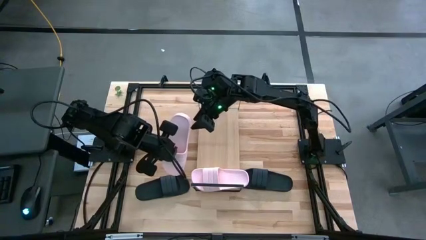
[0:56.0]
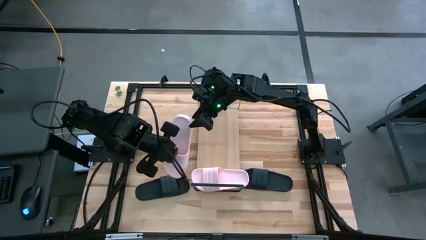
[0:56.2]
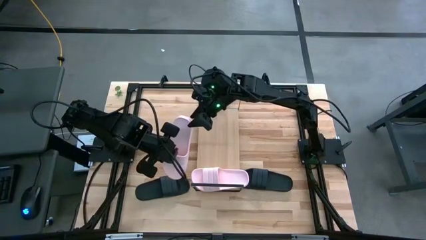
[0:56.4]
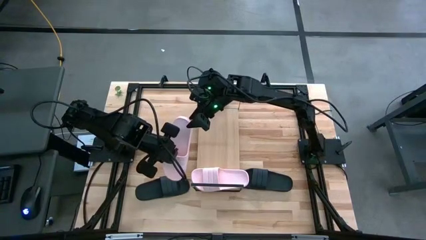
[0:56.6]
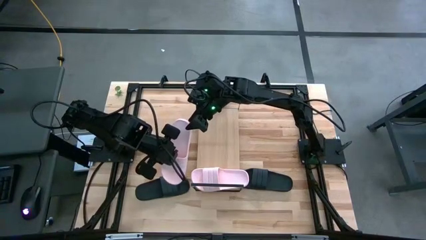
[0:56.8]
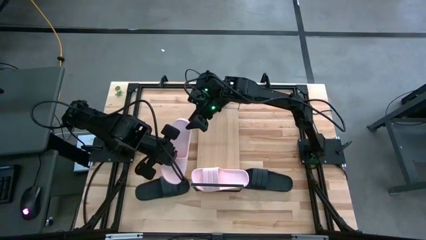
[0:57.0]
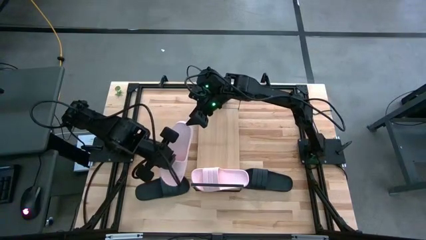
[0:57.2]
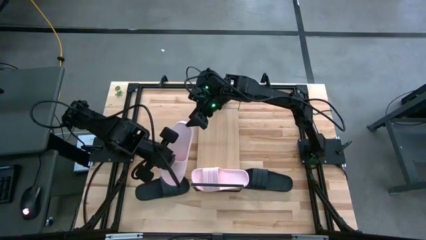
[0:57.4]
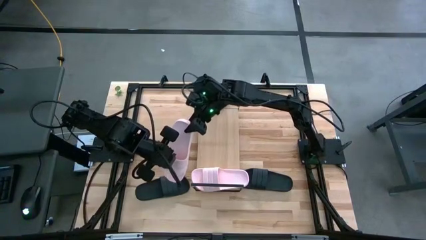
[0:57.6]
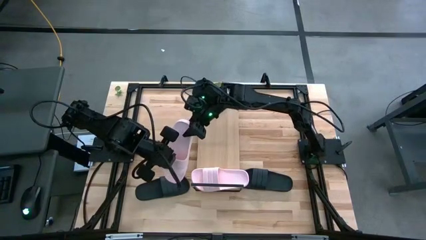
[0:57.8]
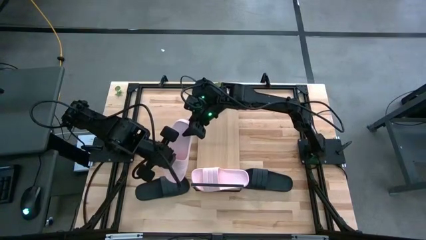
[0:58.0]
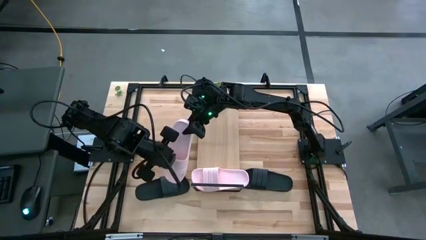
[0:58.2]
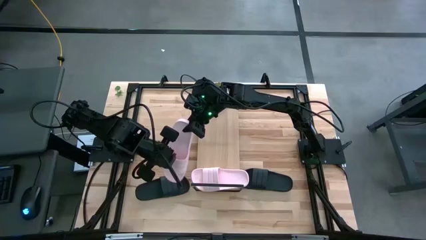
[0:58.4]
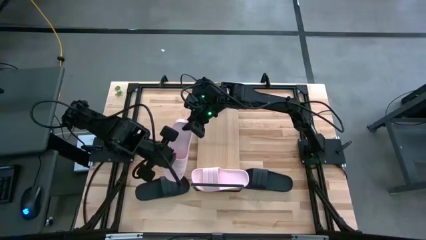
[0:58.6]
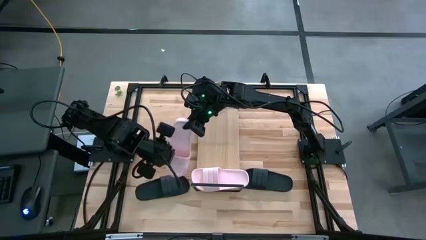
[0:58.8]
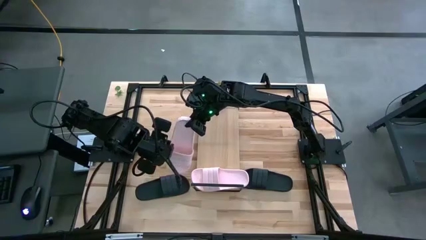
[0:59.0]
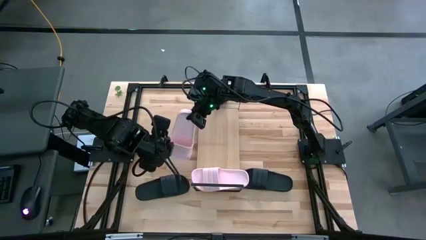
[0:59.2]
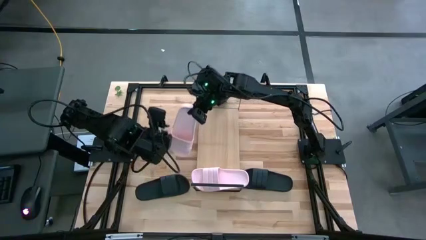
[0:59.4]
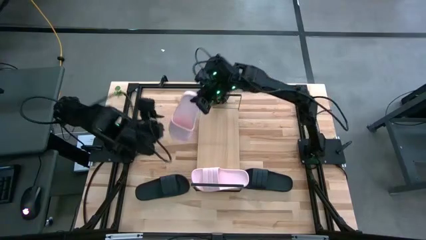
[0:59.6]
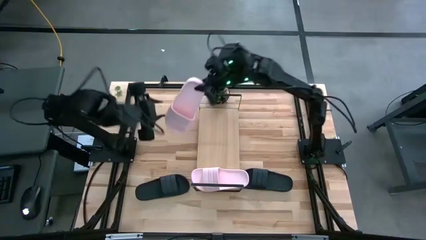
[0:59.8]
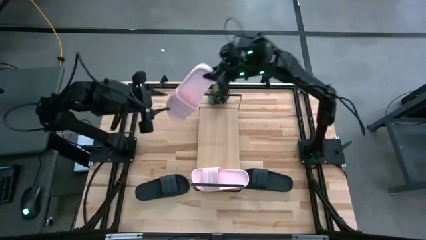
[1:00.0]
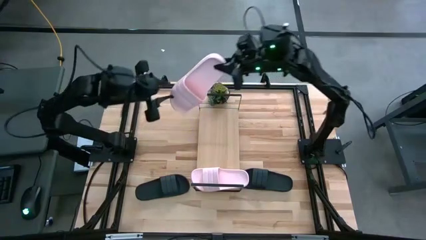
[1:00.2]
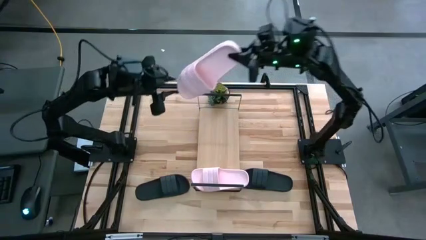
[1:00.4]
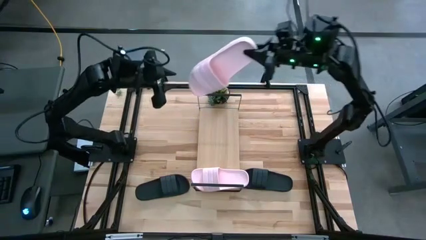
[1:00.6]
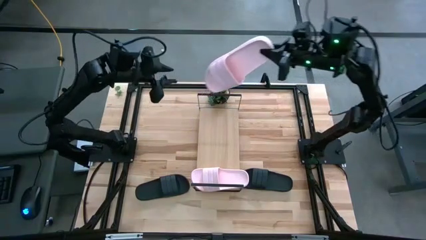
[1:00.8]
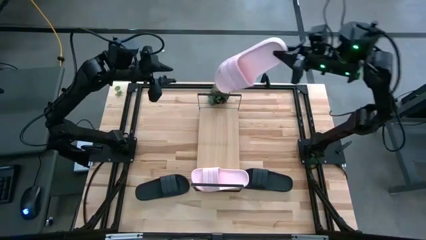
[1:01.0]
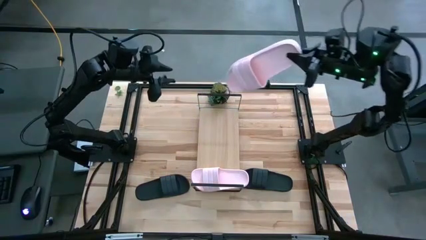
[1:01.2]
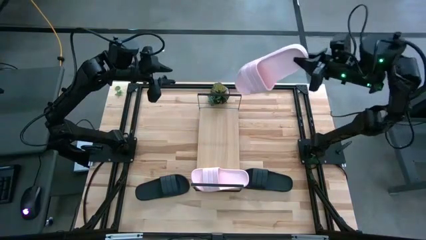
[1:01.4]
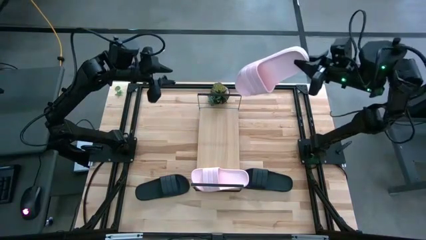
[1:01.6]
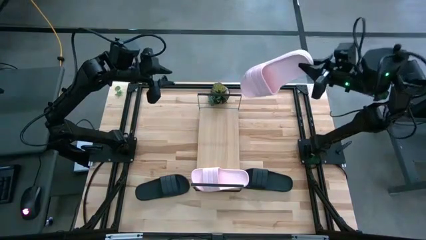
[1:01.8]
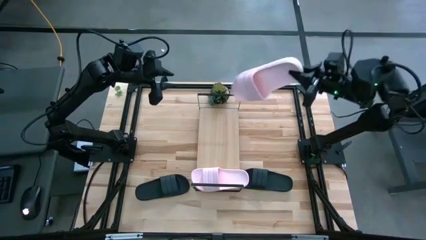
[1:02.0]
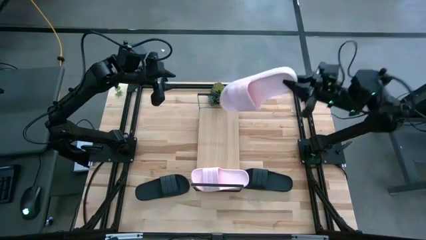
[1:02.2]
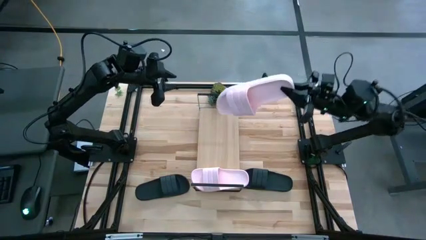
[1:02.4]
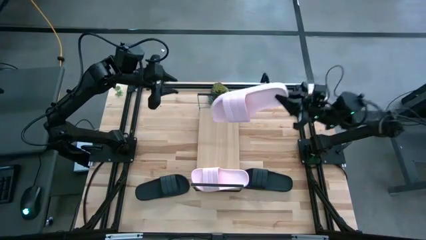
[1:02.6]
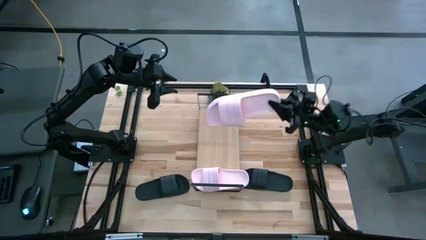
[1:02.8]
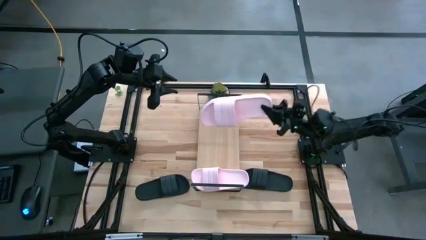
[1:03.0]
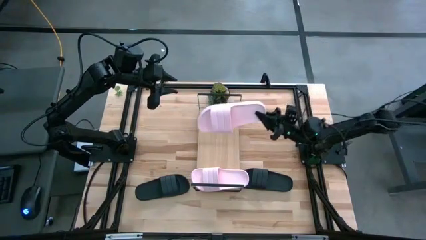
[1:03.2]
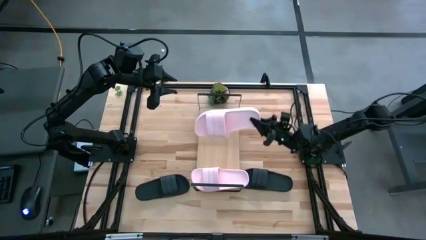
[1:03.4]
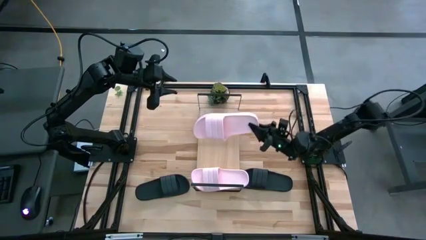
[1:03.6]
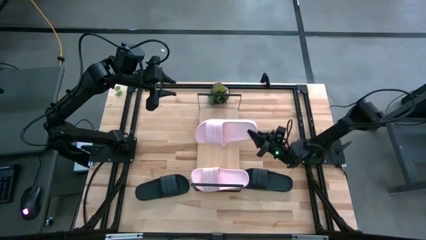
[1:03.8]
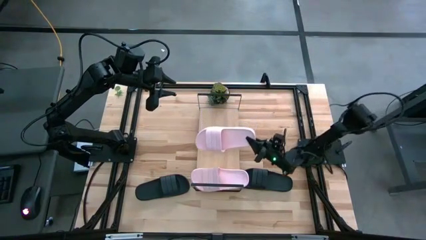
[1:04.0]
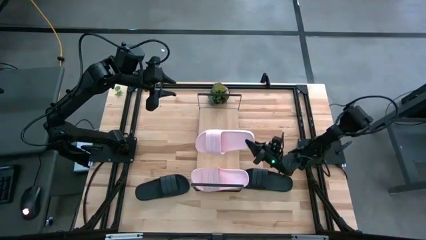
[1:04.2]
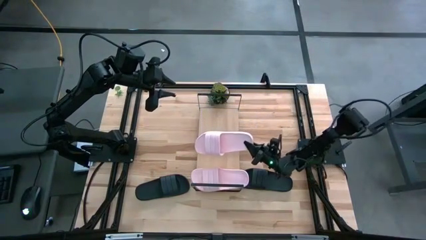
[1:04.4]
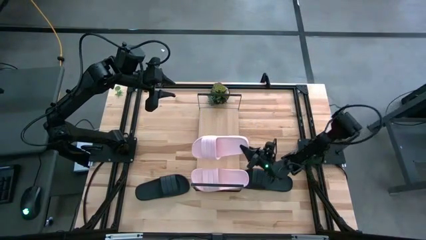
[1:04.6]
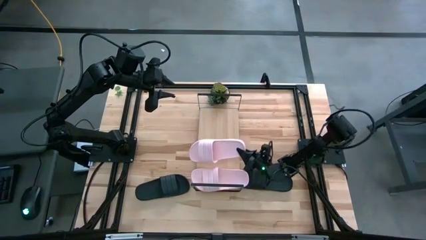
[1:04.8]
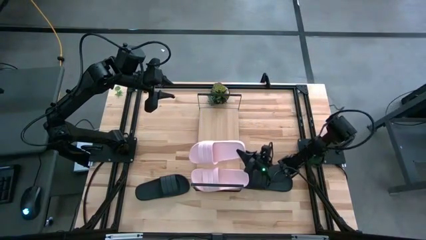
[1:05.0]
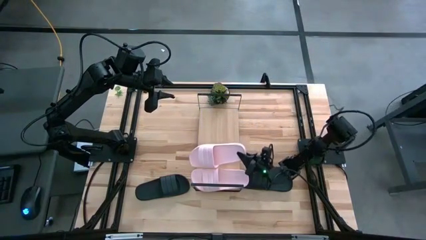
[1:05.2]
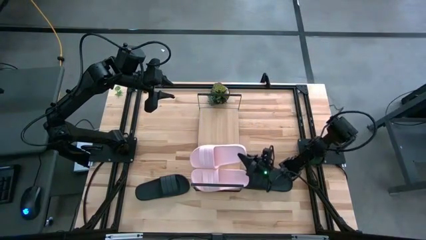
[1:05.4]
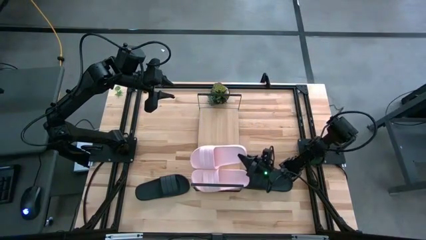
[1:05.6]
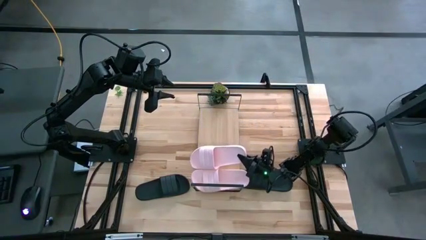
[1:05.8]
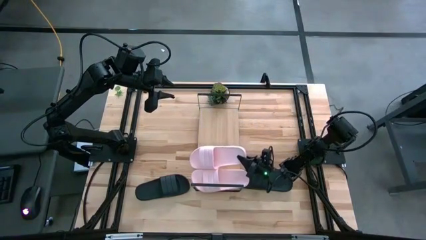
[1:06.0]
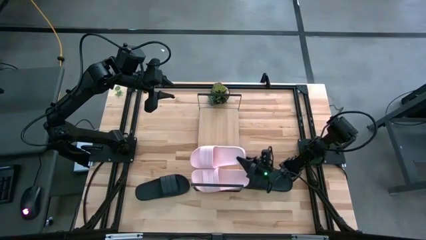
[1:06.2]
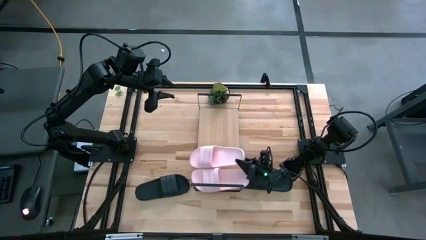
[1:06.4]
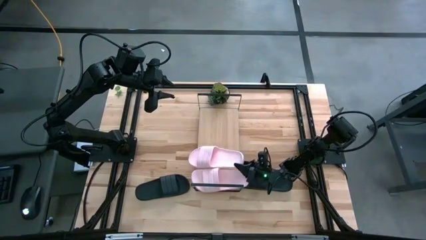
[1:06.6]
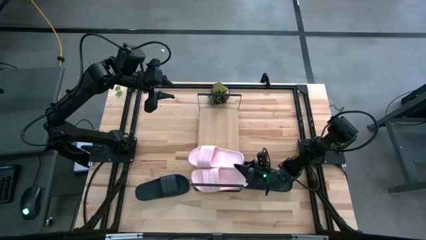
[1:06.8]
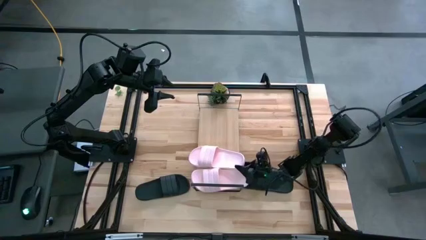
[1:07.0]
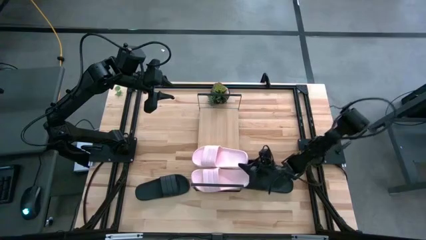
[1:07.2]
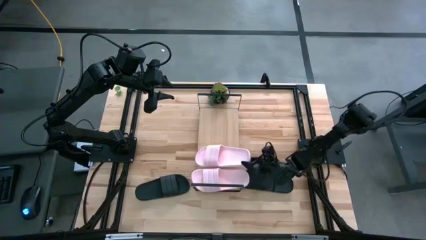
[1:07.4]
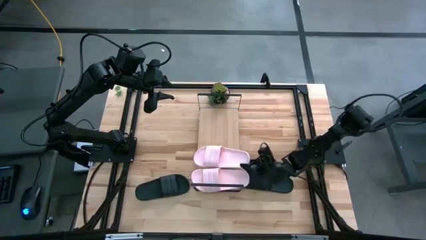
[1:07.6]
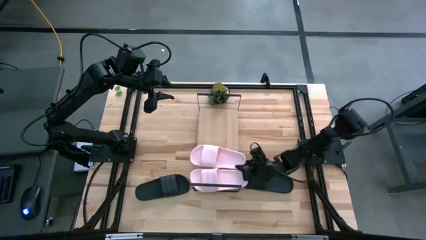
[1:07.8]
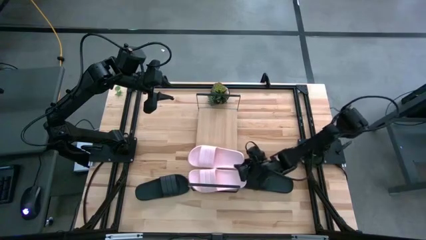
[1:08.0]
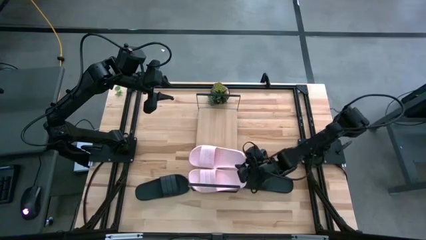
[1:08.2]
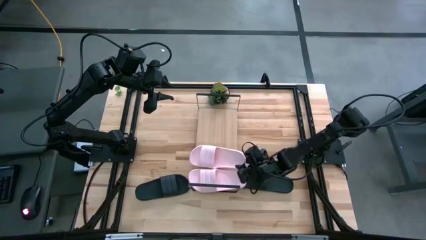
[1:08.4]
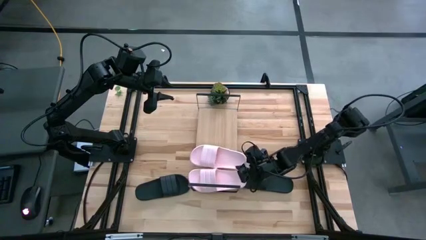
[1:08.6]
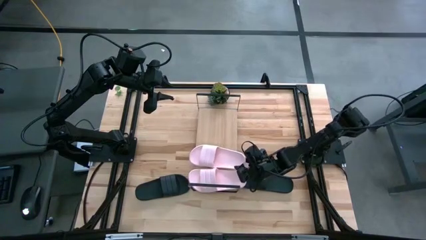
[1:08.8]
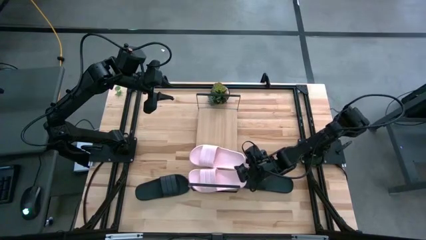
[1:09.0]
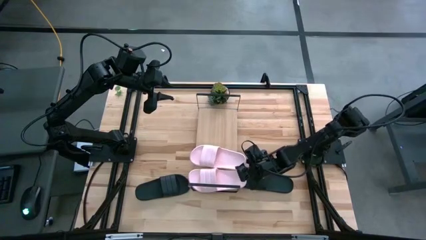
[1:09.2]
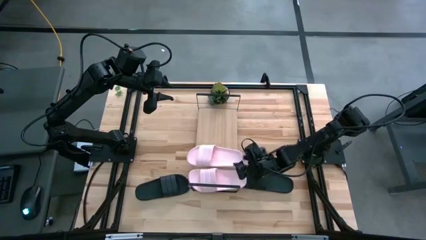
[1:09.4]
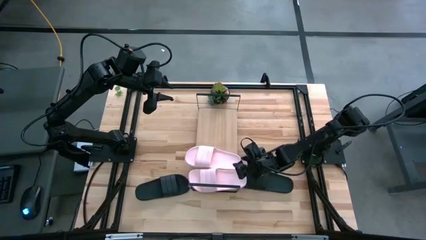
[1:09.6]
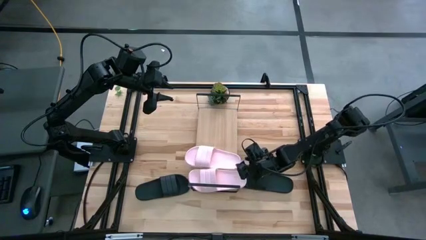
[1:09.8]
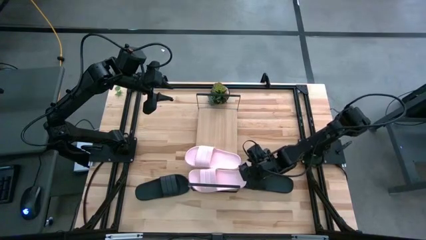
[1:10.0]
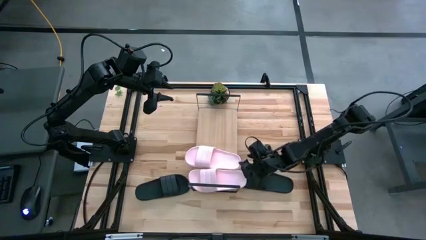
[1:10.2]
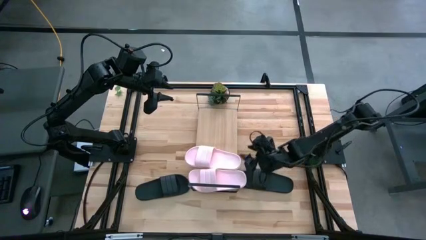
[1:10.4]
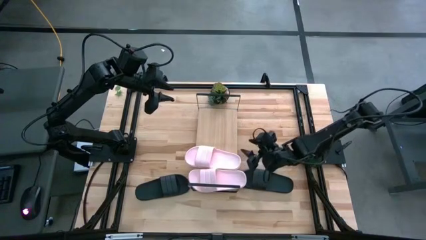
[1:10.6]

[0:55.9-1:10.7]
Task: Pick and place slides into the shelf
Put the pink slide on the shelf
